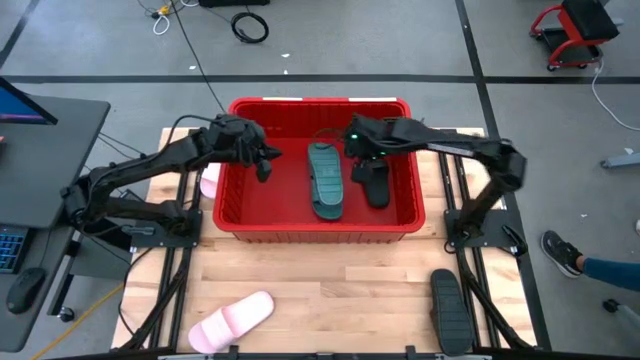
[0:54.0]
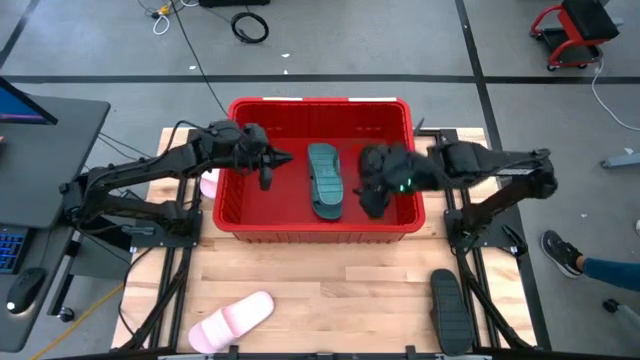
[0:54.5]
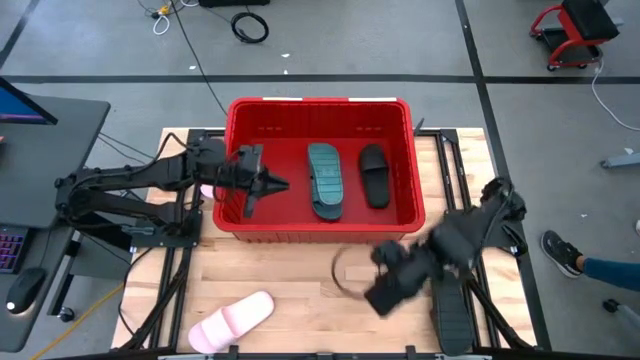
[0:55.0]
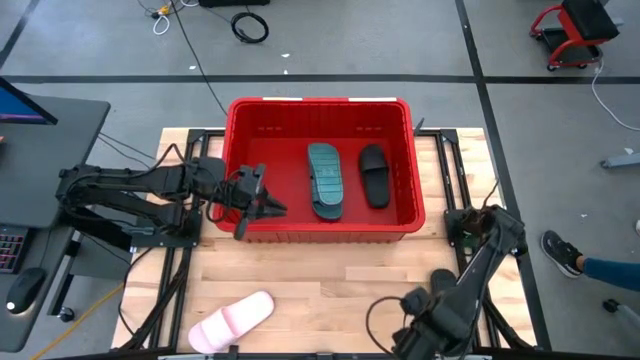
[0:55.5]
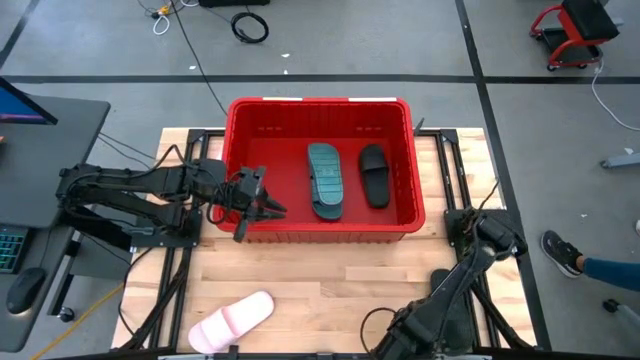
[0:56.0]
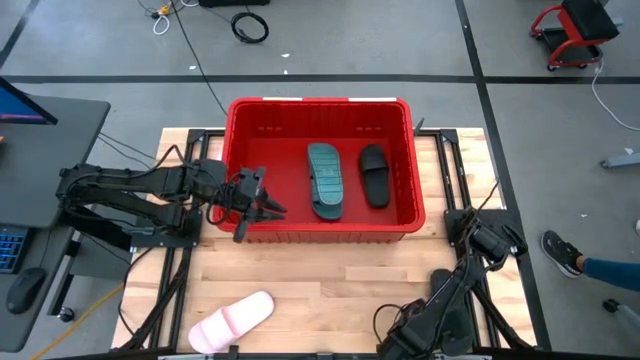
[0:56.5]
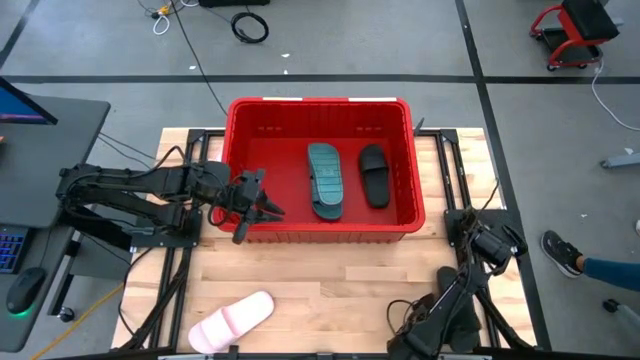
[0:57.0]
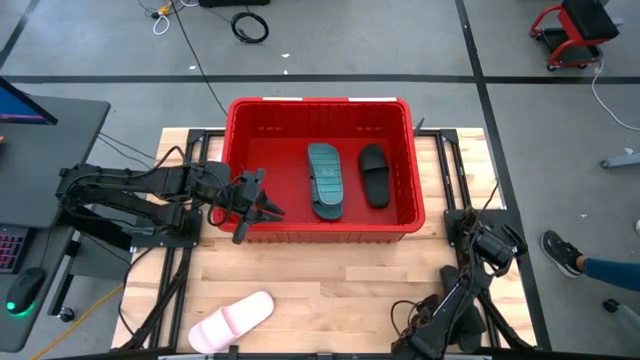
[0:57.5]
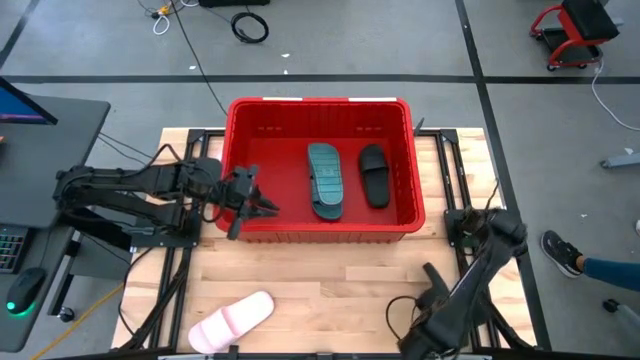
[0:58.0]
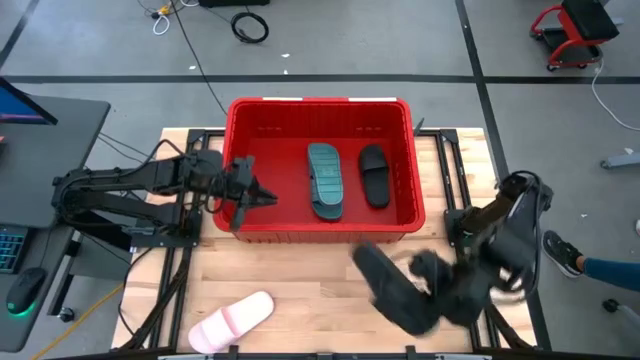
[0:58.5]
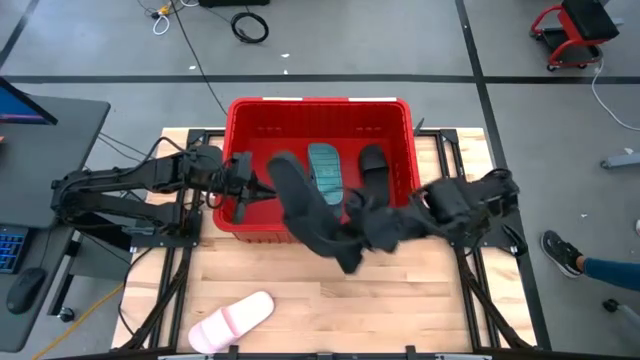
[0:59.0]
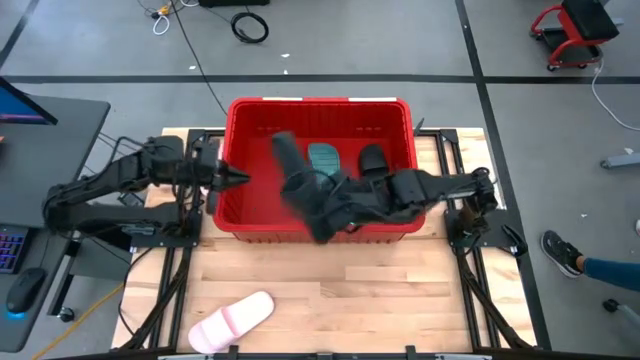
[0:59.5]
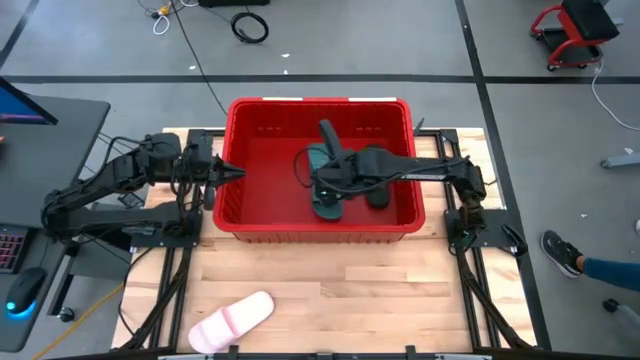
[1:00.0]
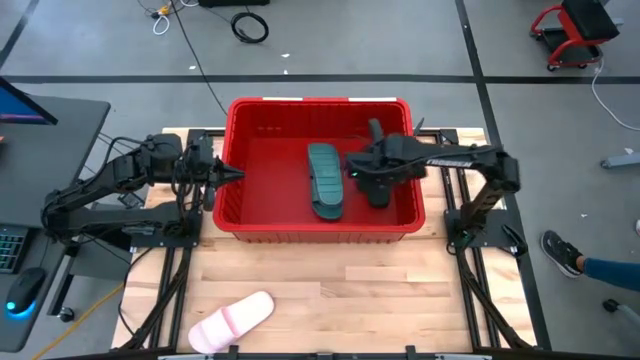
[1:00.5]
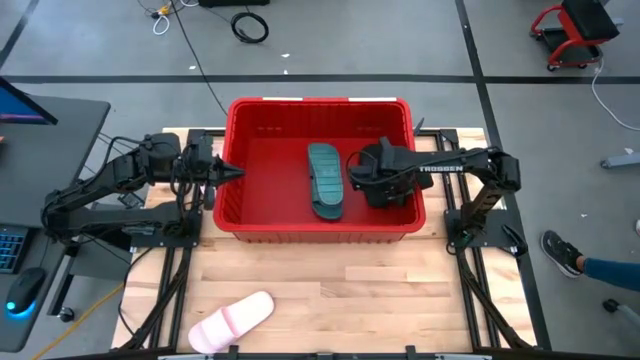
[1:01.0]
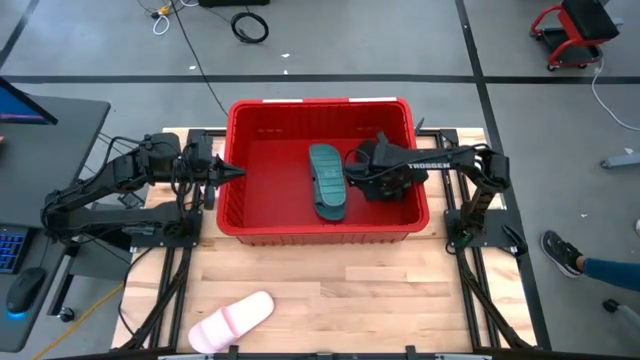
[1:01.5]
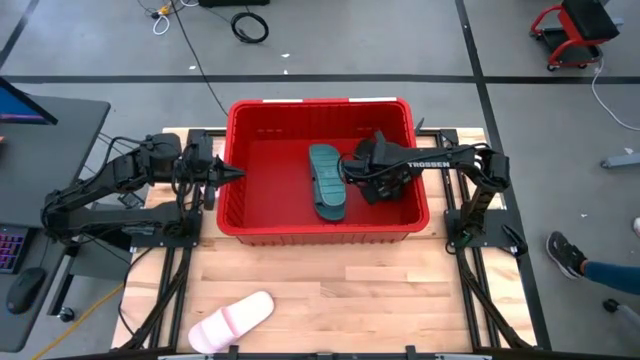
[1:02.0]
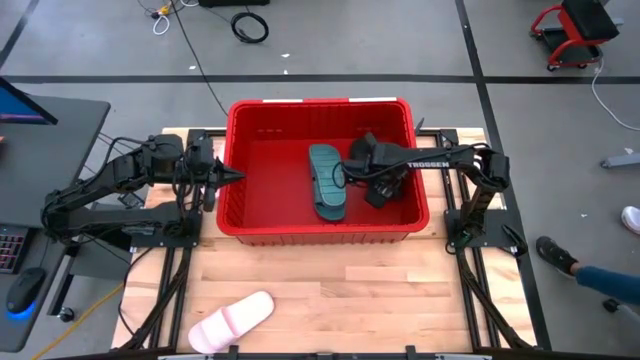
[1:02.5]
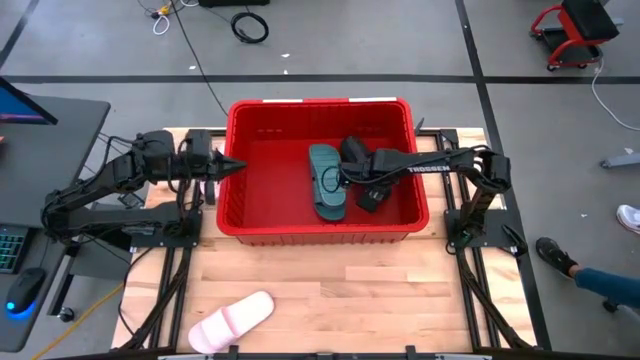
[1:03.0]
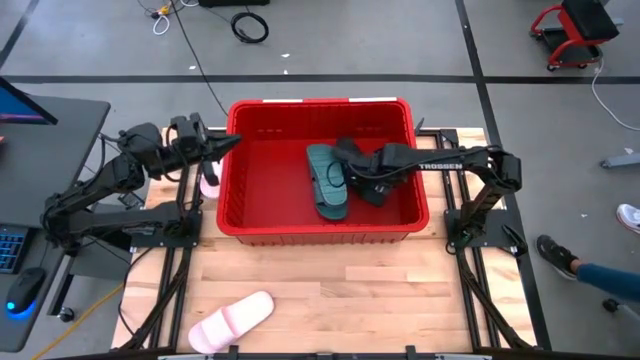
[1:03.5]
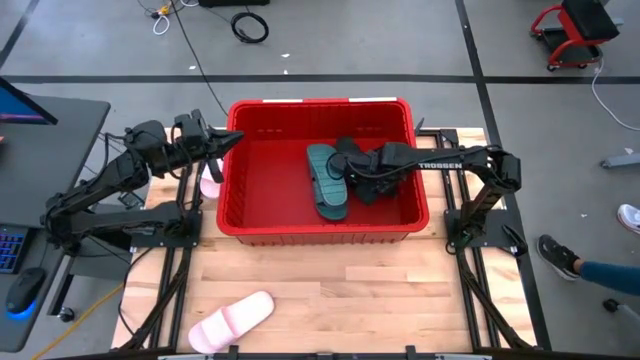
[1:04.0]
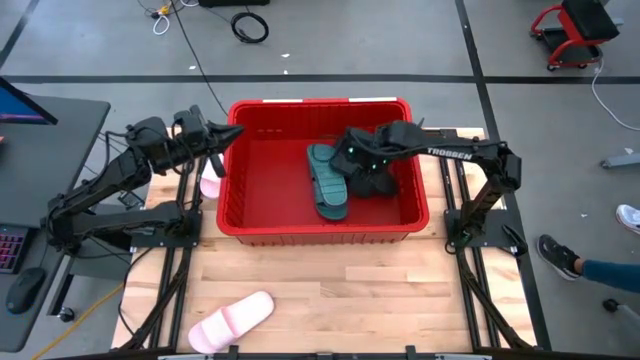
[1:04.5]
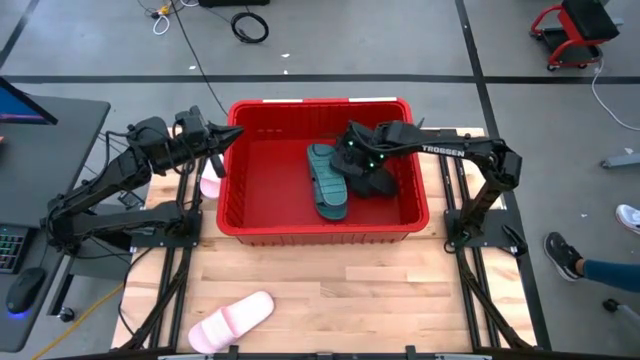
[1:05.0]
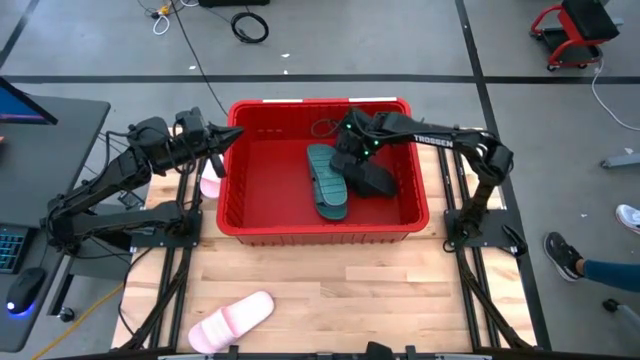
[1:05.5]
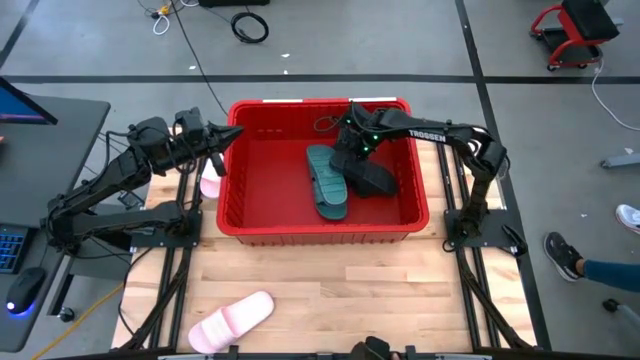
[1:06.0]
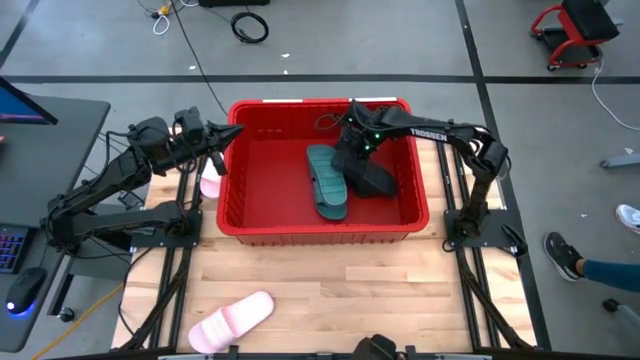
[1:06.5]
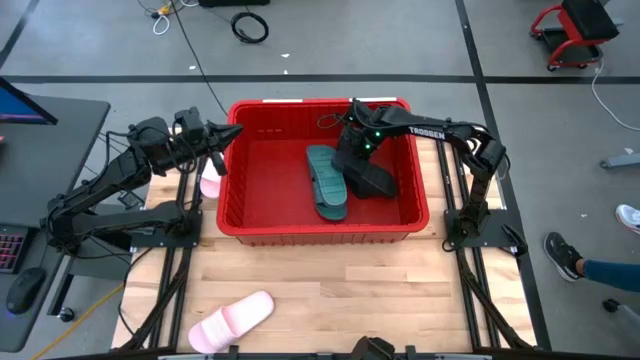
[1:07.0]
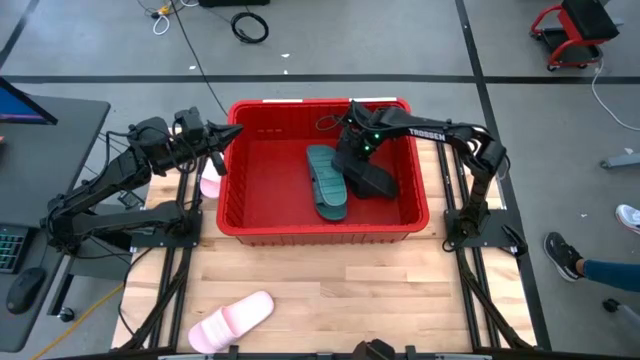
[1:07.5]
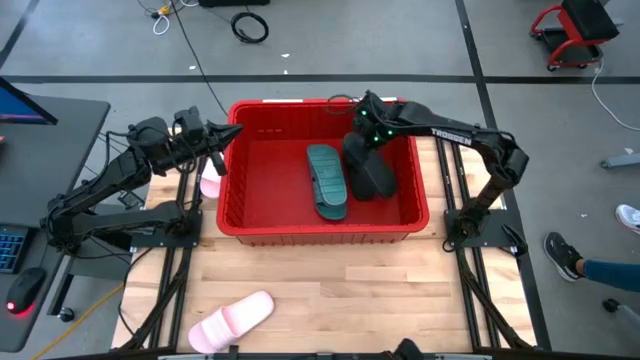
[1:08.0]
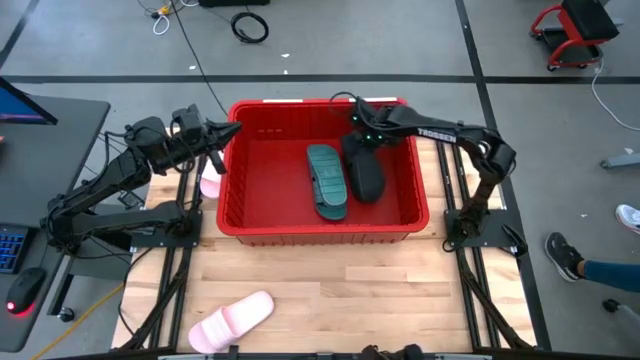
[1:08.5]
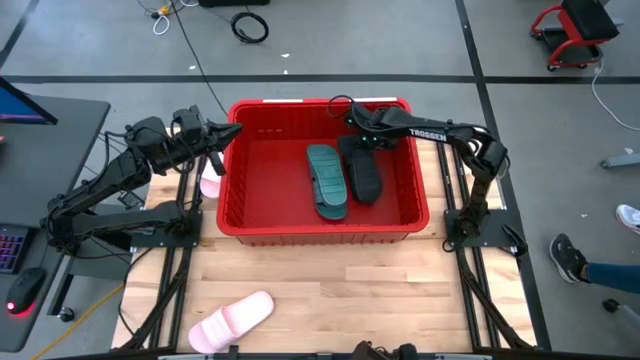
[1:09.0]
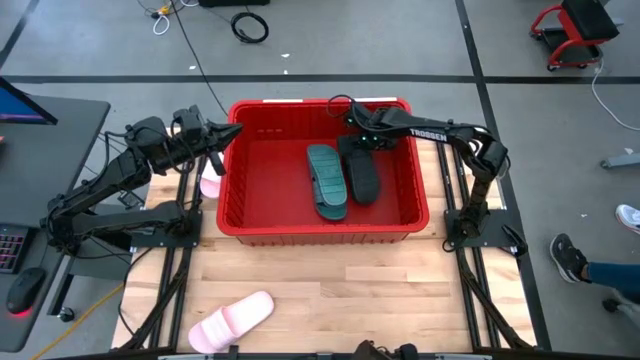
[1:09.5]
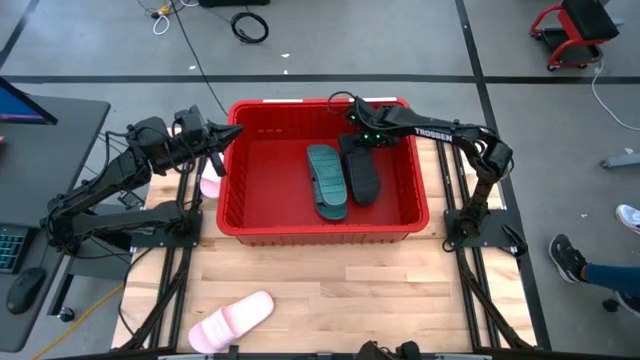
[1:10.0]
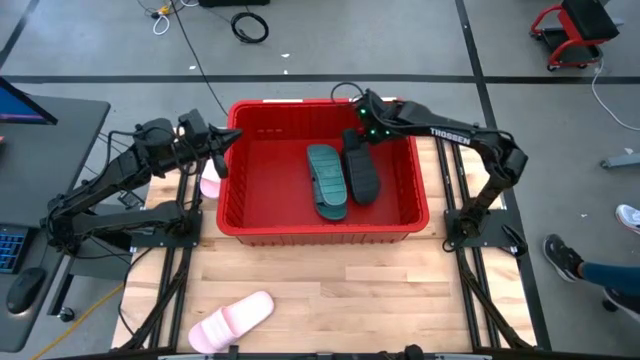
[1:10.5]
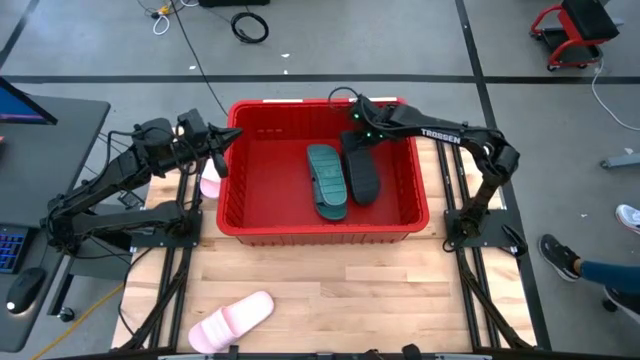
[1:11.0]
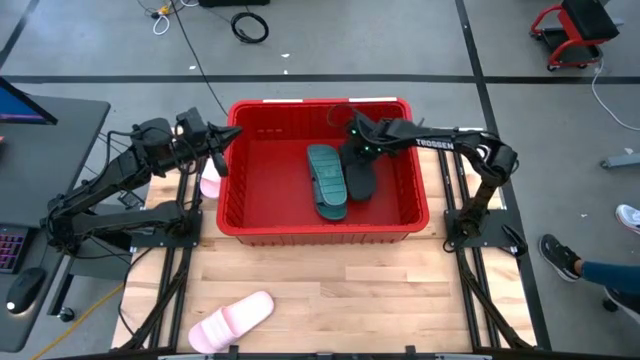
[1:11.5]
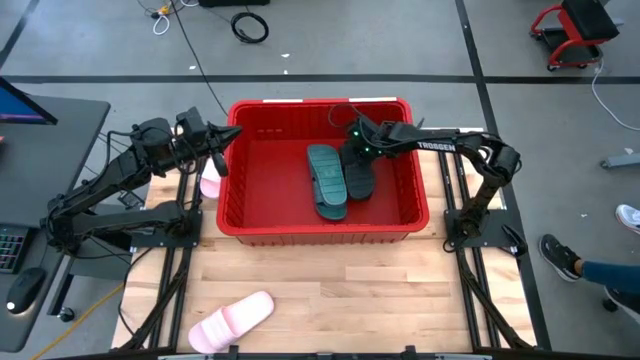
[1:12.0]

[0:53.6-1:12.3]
Task: Pick and place slides into bin
Put the black slide into the red bin

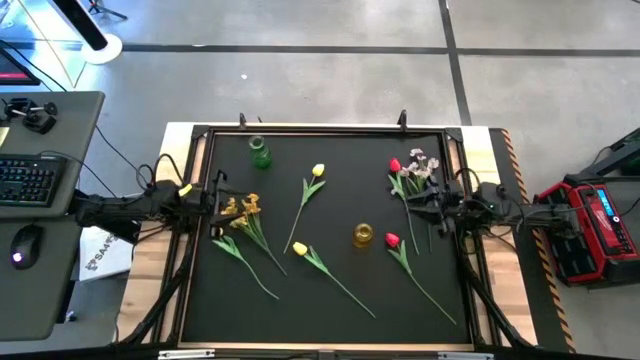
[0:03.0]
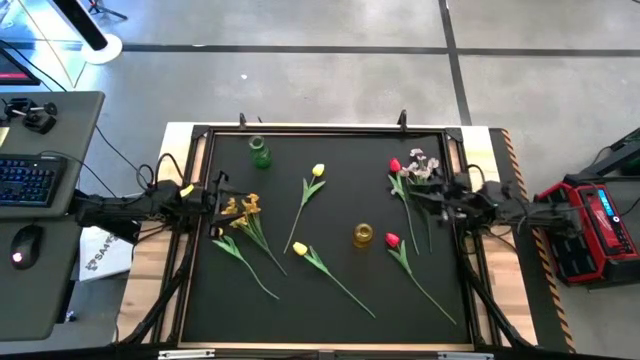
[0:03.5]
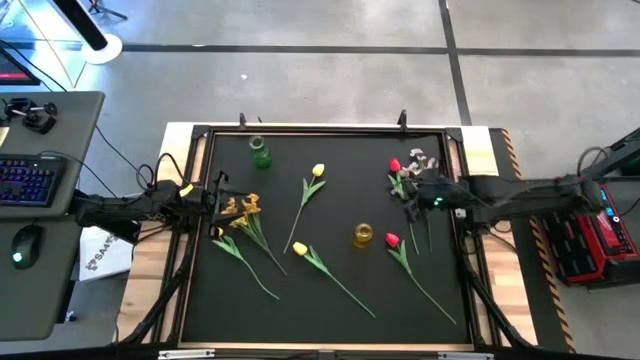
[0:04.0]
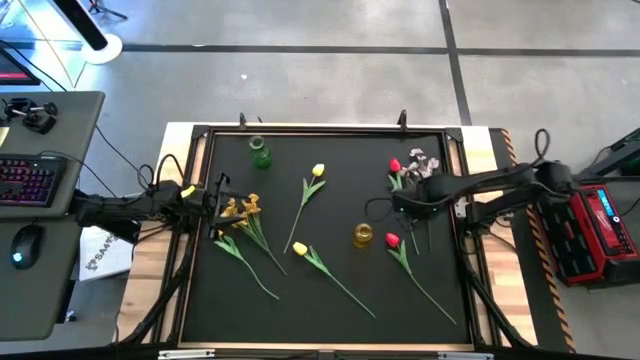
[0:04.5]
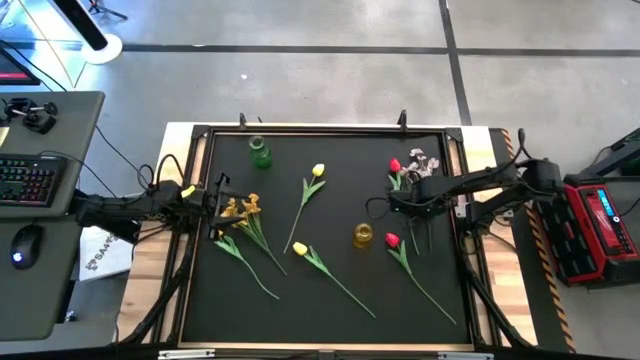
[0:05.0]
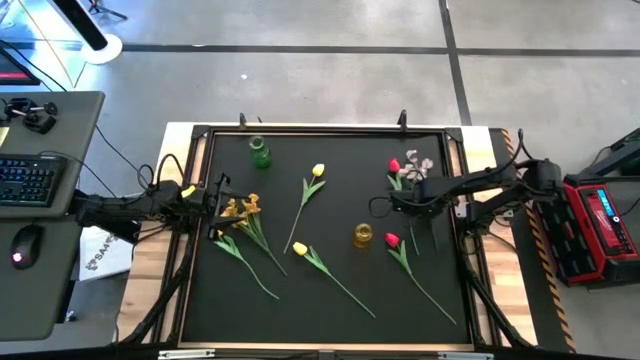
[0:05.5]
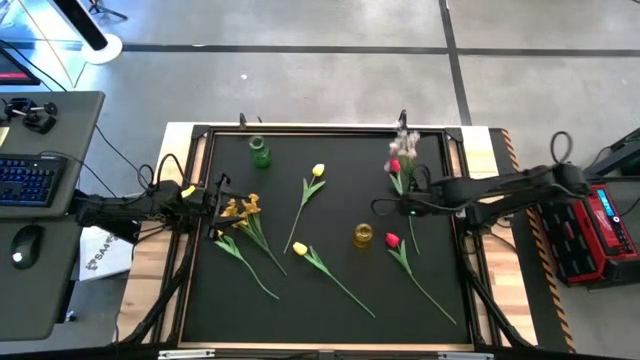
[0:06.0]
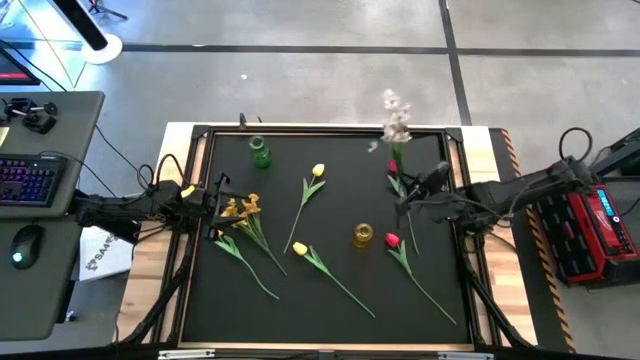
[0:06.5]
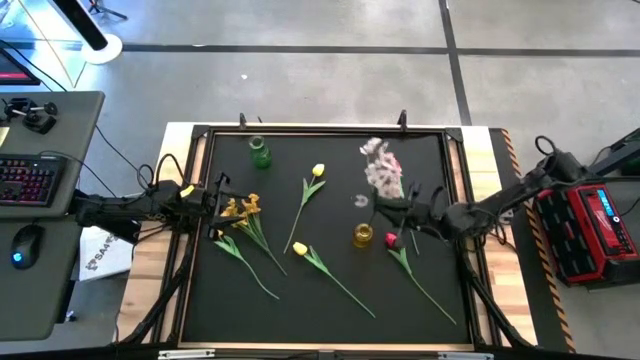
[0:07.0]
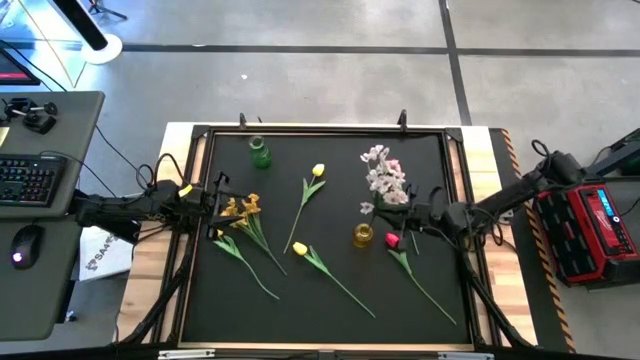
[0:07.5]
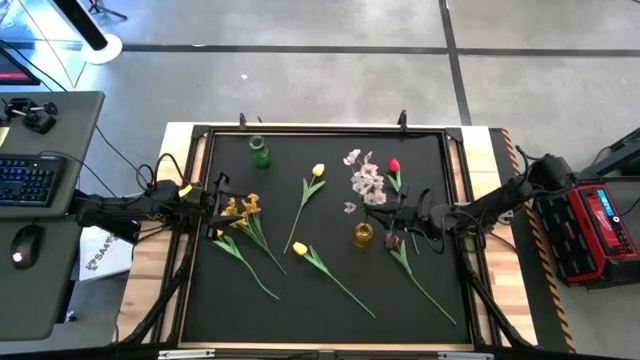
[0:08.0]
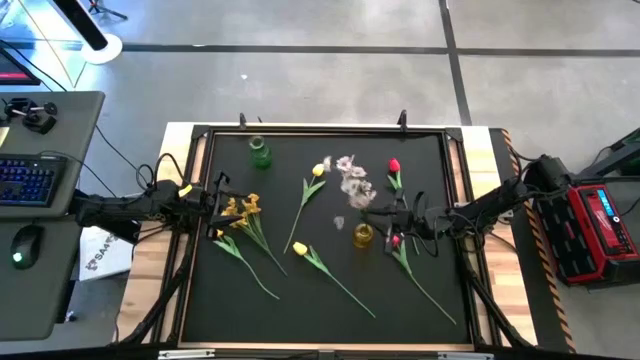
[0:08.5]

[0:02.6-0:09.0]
Task: Sort flowers into vase by color
Put the white flowers into the yellow vase
